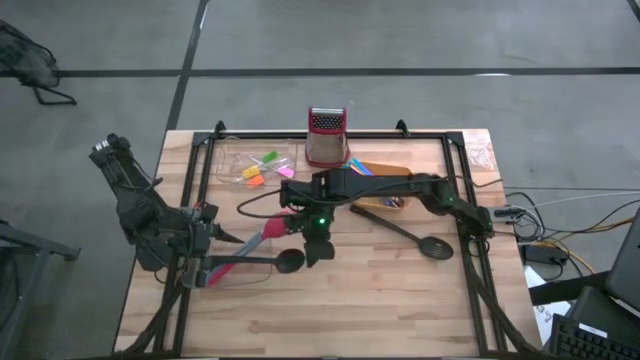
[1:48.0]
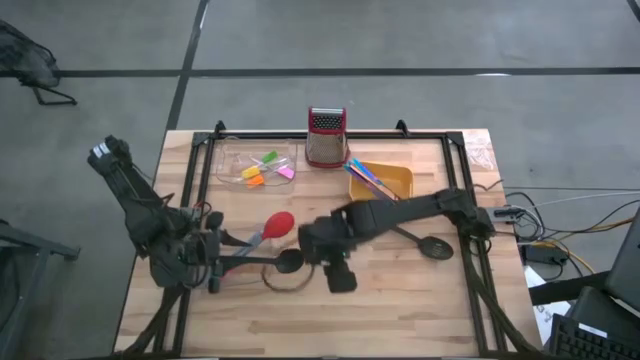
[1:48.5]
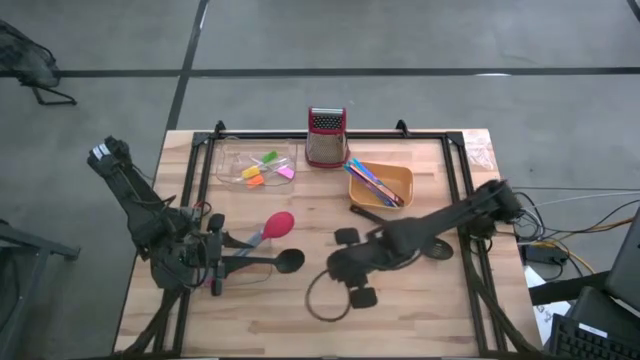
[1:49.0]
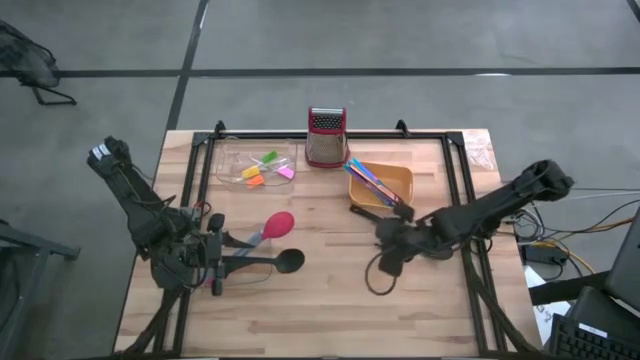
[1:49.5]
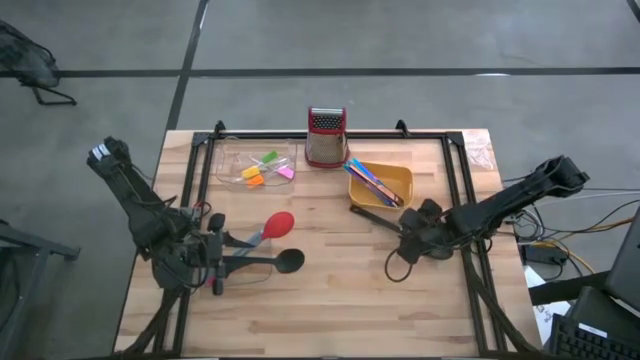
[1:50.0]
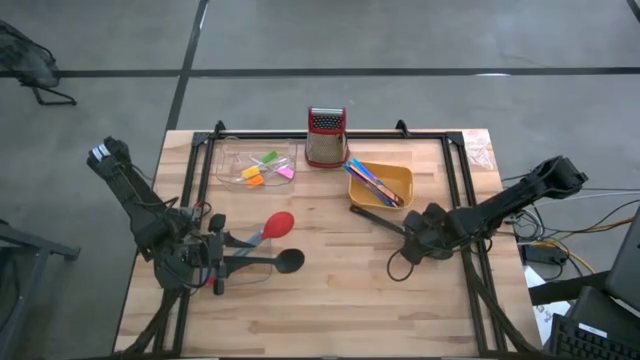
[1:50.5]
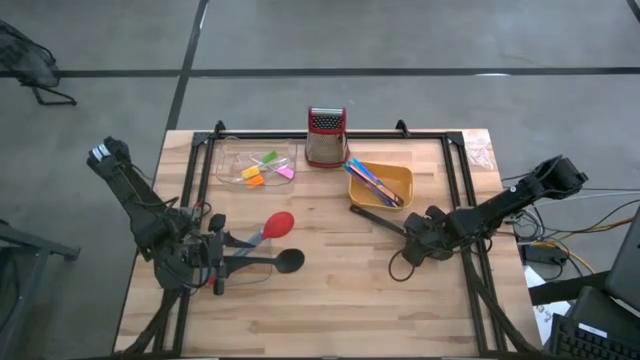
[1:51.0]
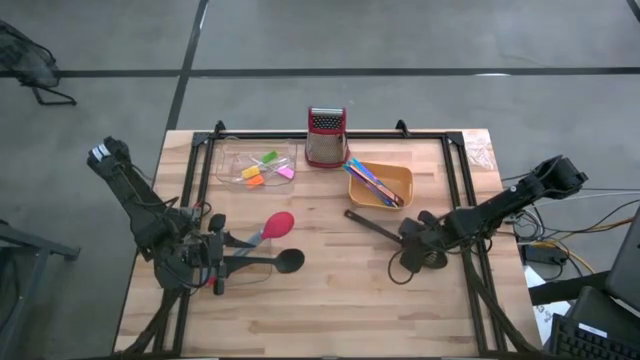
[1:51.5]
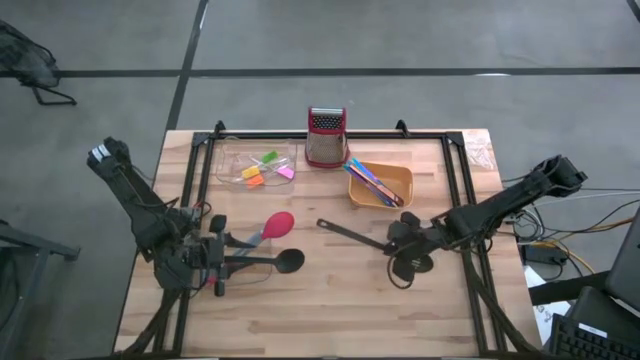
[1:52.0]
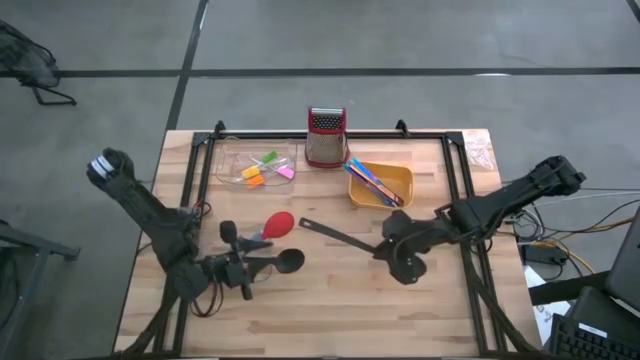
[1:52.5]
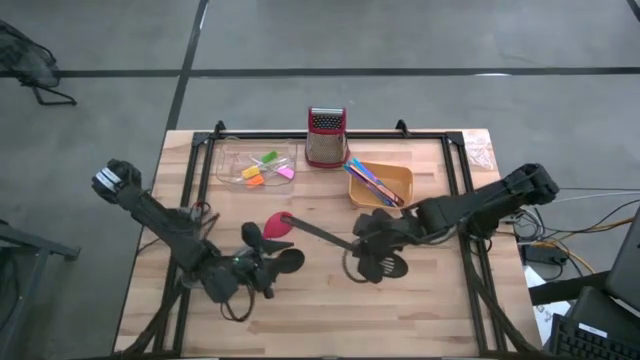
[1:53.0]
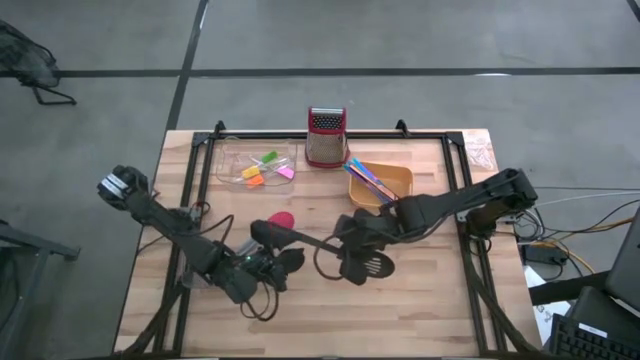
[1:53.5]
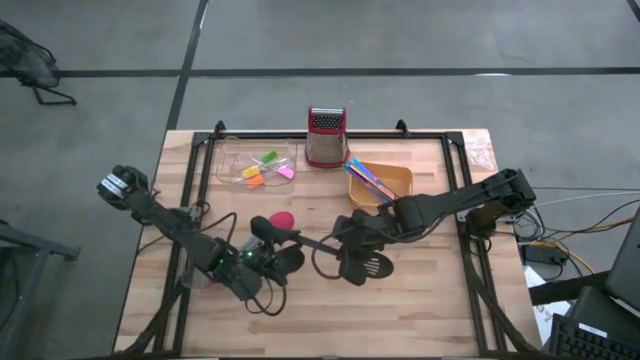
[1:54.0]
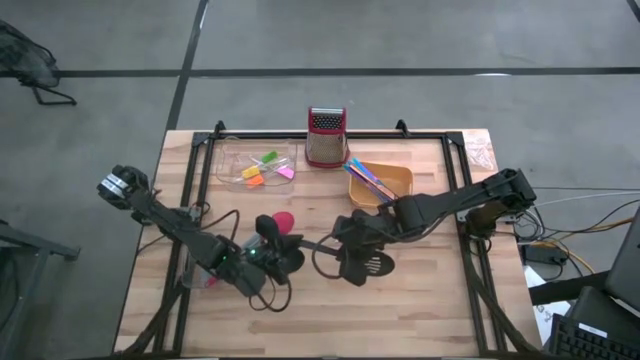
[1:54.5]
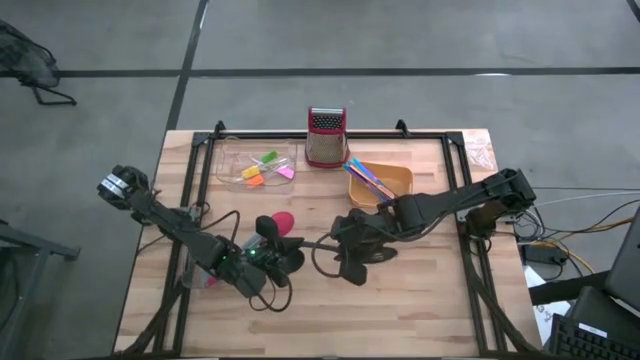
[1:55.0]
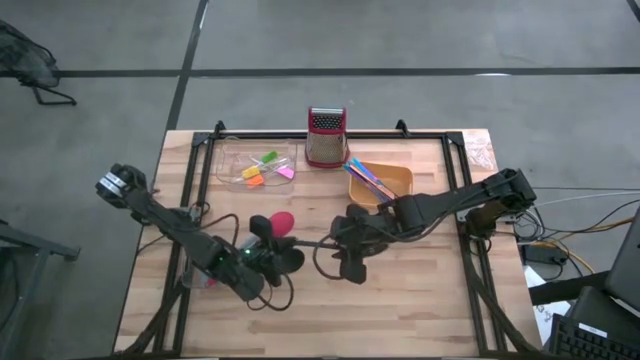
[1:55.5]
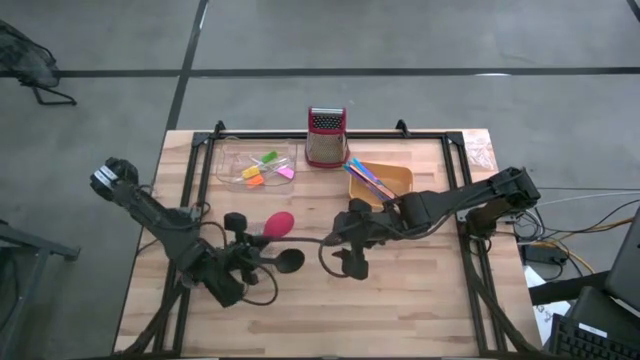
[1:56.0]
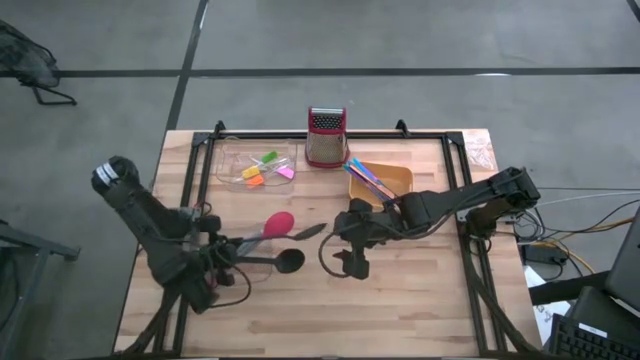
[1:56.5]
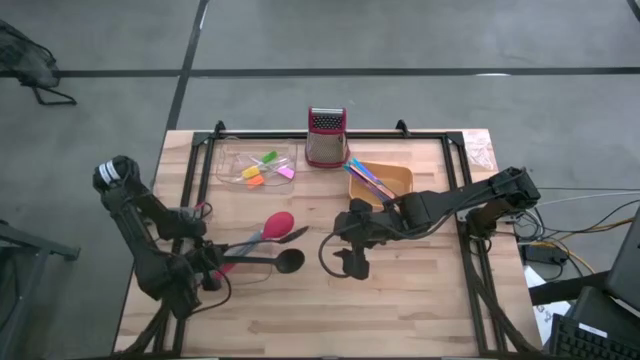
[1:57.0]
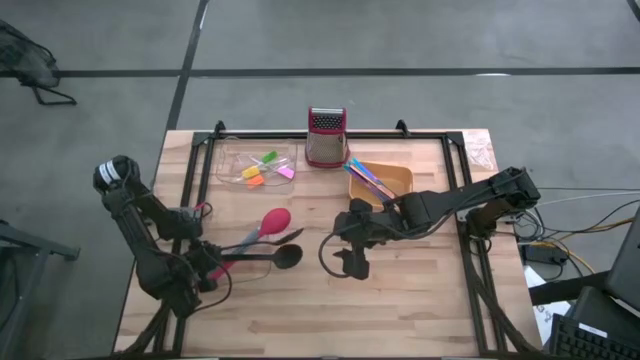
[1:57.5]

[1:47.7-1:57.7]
Task: Pick & Place Kitchen Items
Put the black spoon into the bottom transparent bin

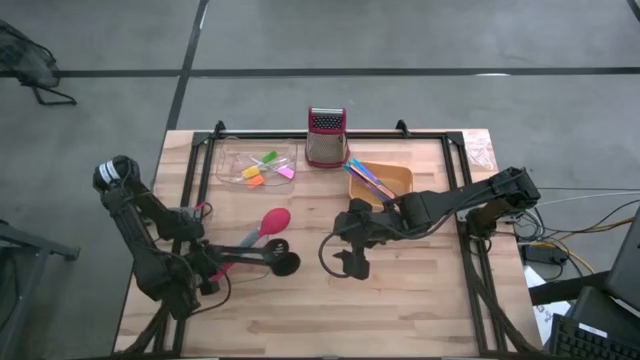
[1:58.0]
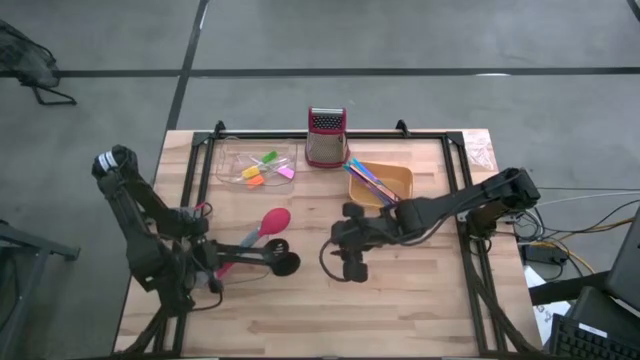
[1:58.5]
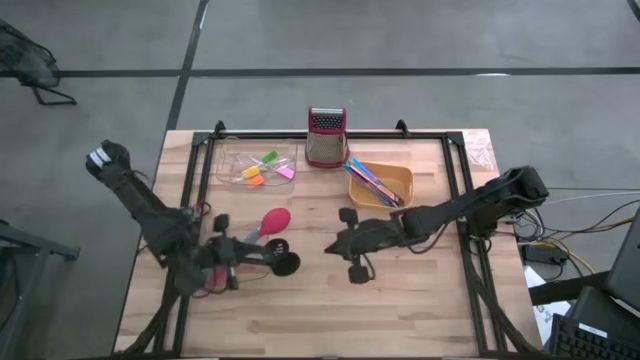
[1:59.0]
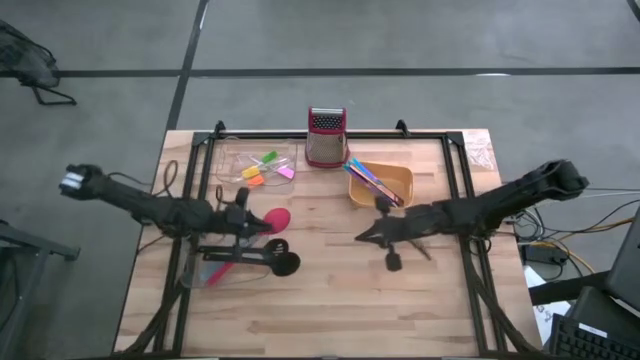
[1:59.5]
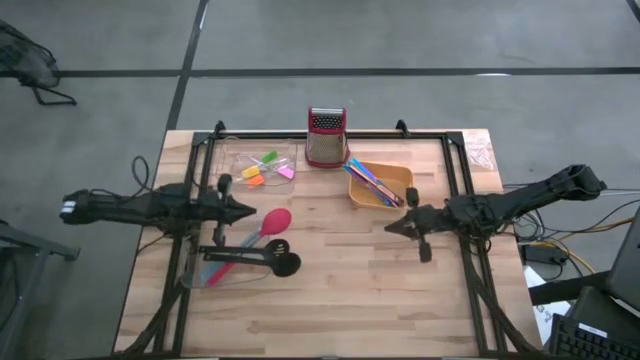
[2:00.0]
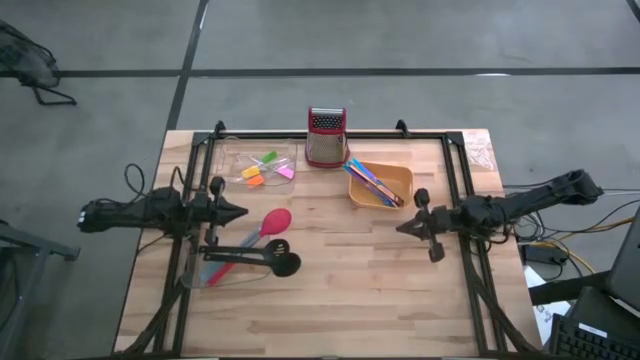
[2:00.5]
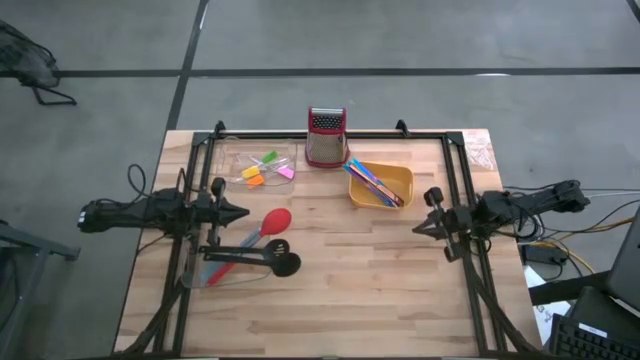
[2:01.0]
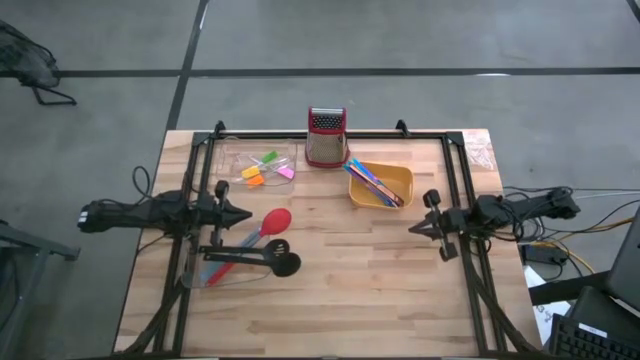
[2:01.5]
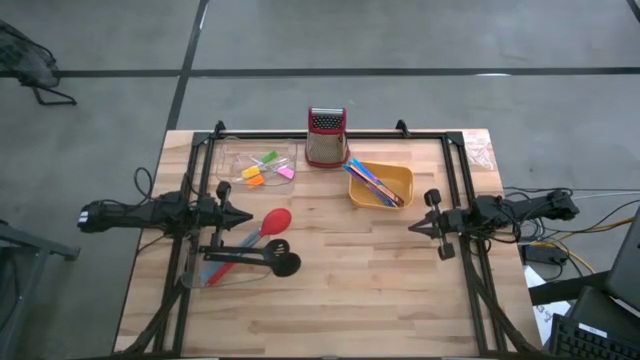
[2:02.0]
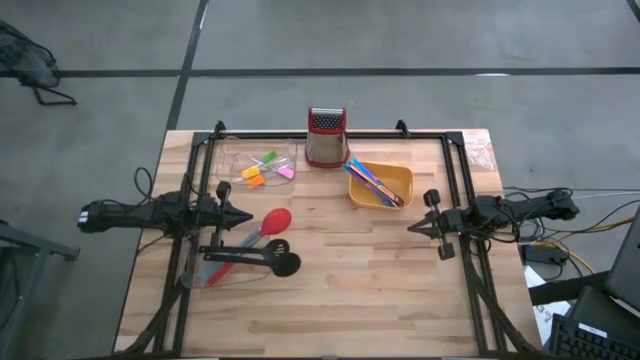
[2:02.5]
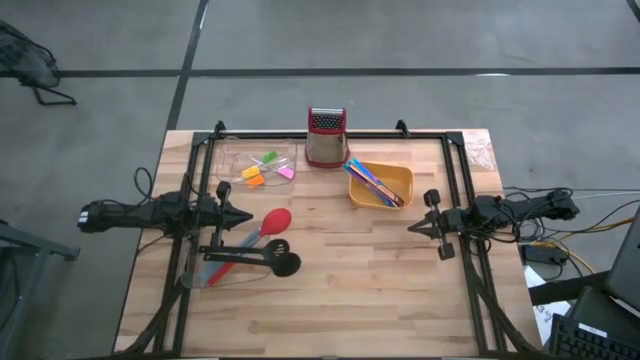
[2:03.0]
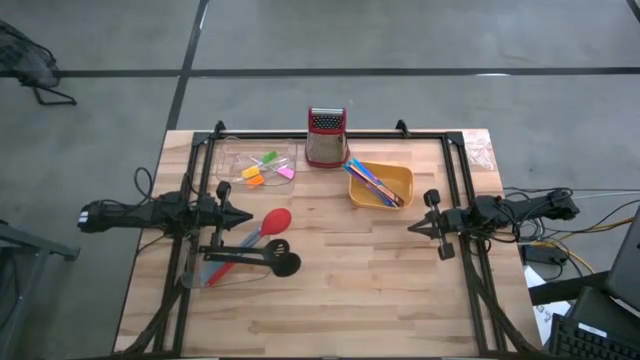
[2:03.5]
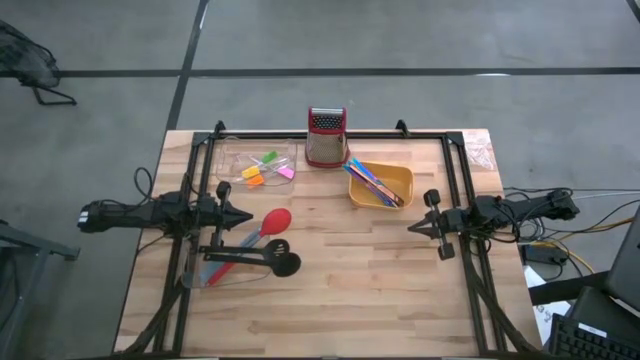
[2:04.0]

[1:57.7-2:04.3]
Return to Home Position
